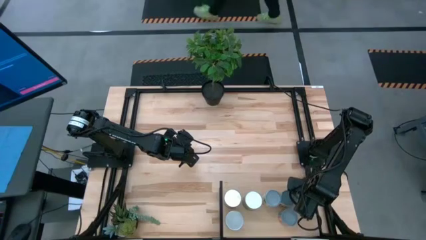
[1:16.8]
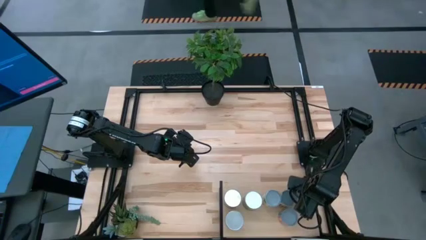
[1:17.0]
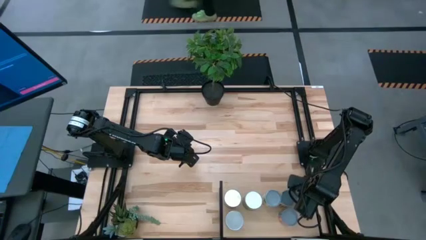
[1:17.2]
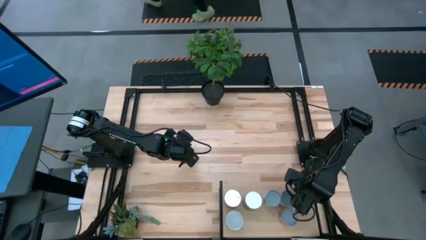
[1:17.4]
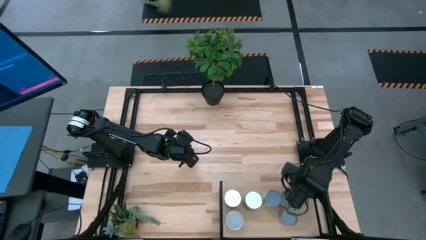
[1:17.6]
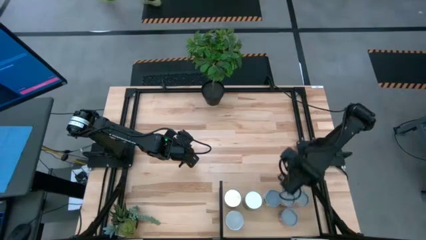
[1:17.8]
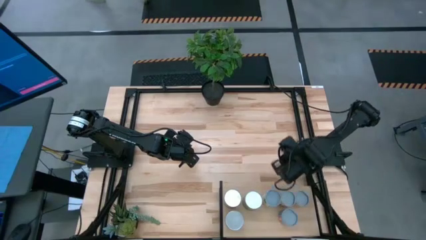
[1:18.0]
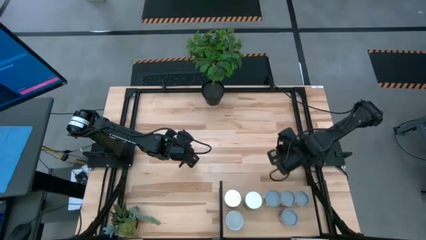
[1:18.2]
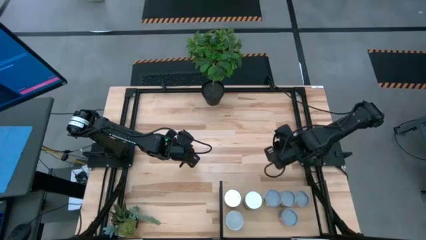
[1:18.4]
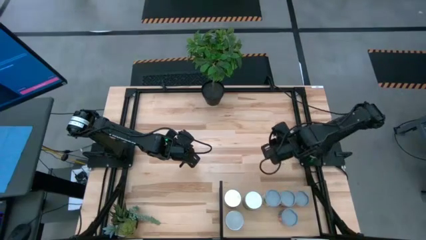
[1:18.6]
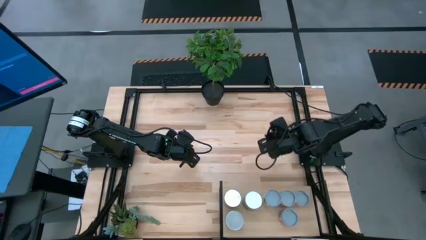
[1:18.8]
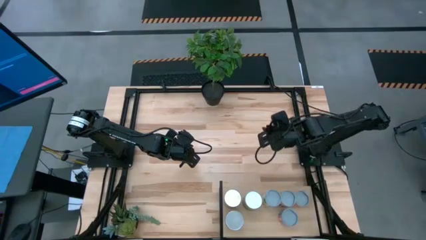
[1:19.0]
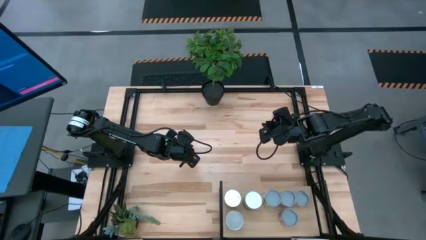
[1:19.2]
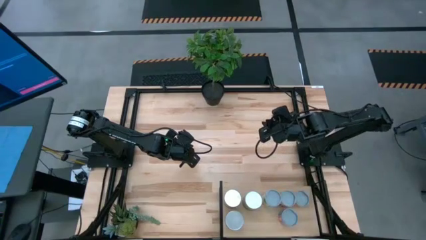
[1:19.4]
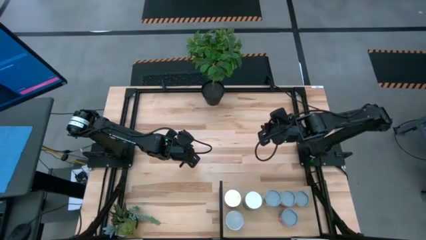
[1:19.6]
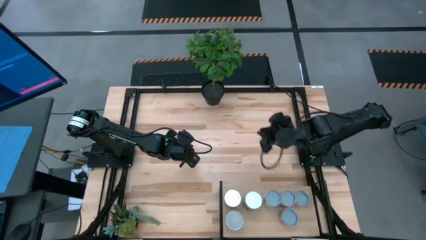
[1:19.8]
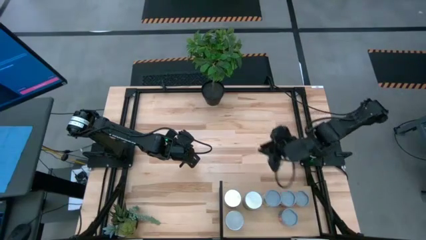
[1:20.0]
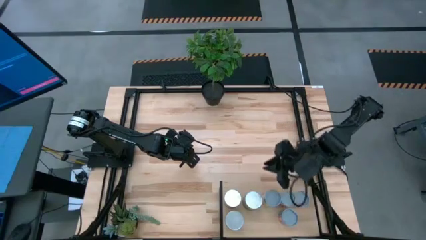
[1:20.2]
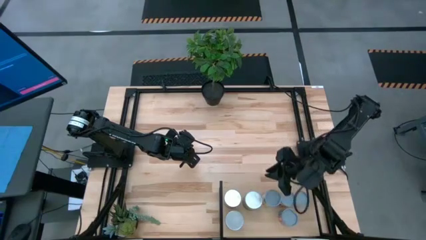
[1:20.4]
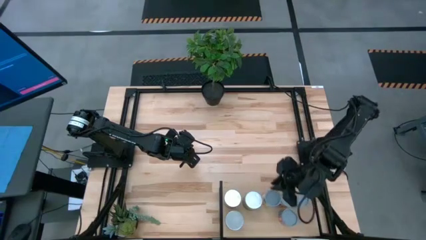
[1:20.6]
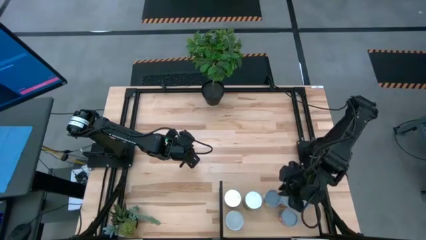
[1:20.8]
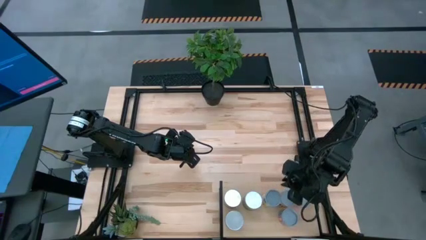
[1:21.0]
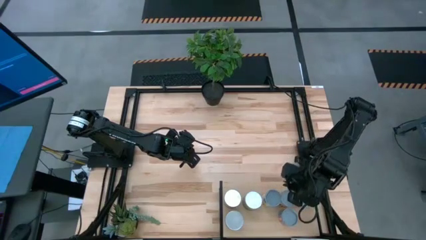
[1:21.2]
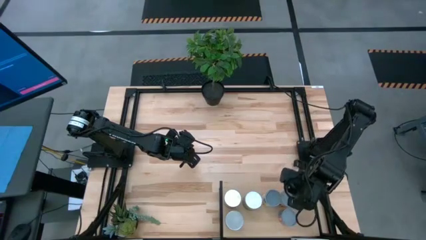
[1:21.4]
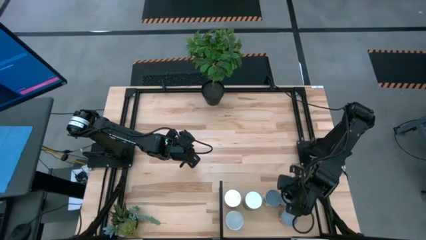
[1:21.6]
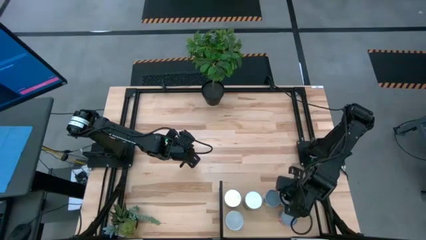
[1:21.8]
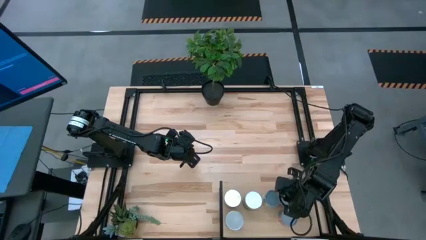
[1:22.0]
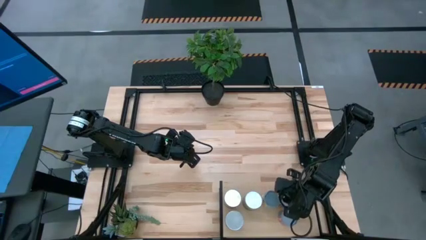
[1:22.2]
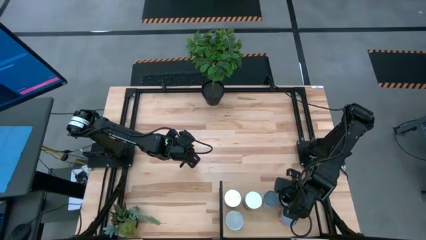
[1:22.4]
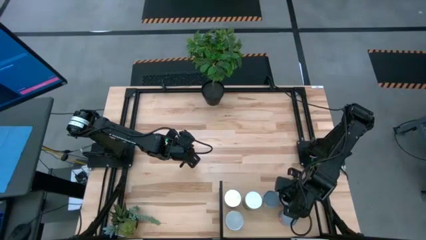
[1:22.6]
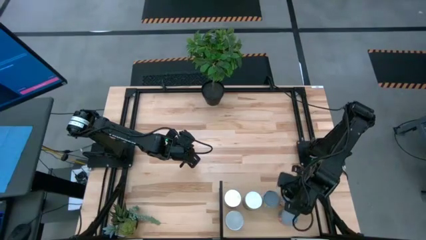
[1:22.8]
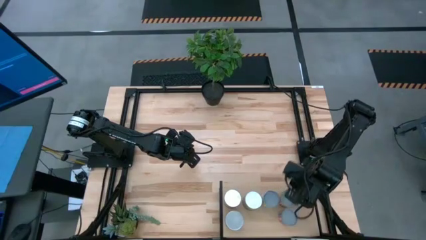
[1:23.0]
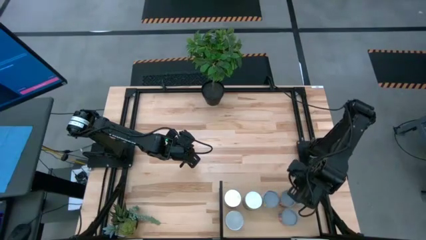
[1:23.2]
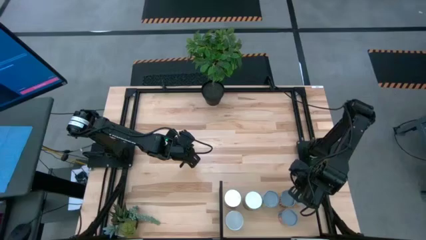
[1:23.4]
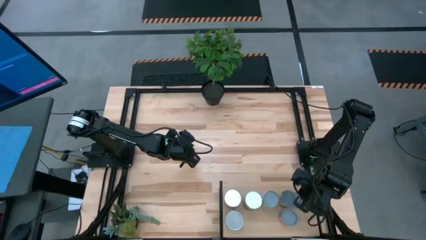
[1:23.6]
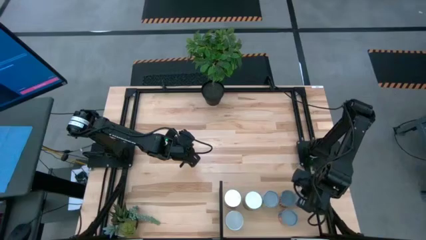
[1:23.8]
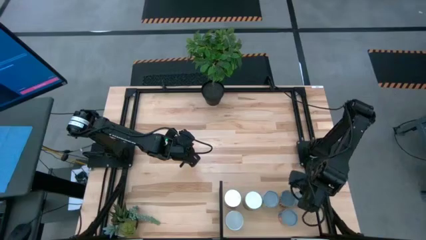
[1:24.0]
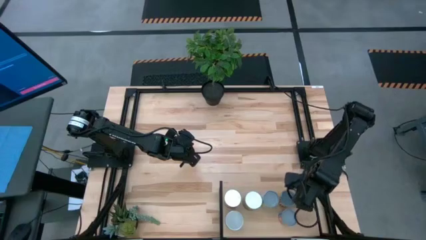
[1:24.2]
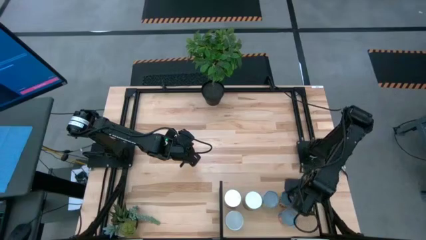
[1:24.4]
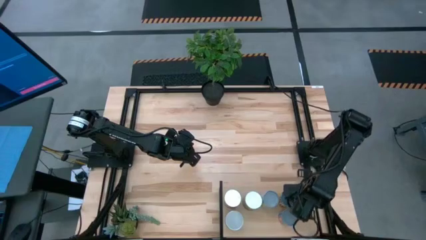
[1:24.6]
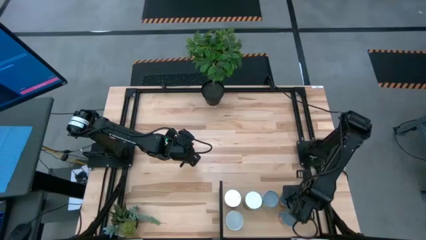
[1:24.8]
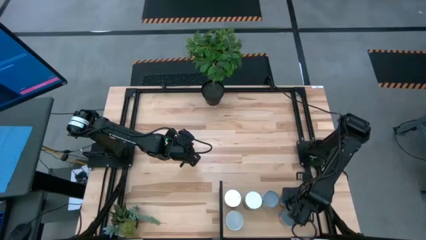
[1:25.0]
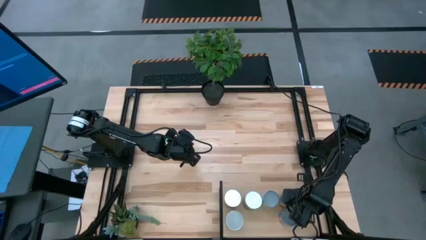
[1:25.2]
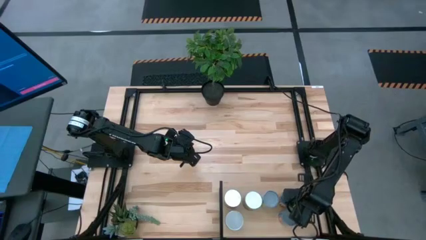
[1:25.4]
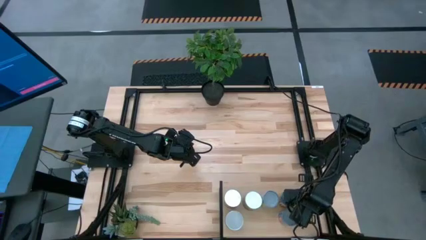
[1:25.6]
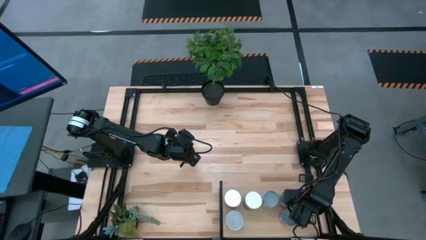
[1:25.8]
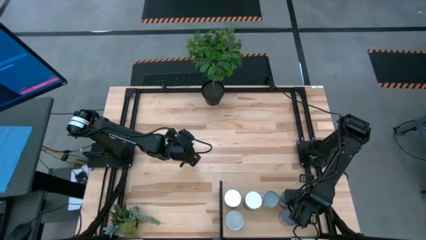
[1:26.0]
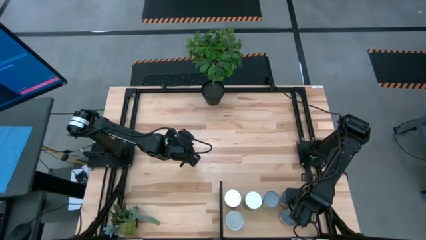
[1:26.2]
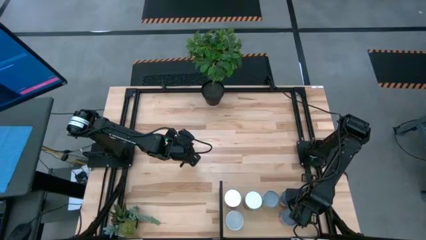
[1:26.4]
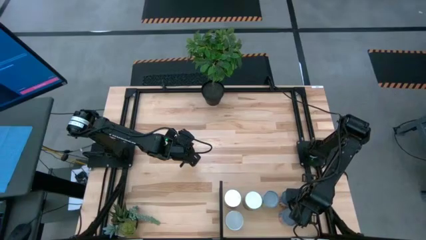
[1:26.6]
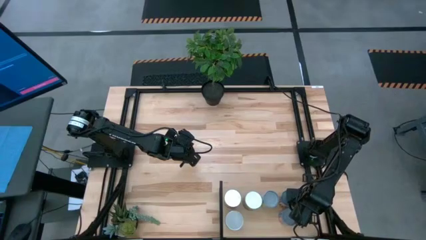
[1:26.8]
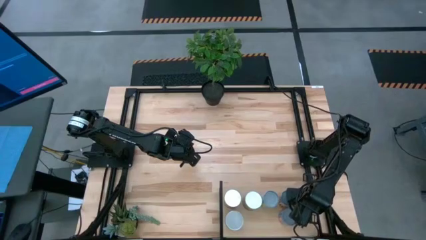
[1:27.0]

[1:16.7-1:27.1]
Task: Pick and place cans onto a shelf
Adjust the cans on the shelf

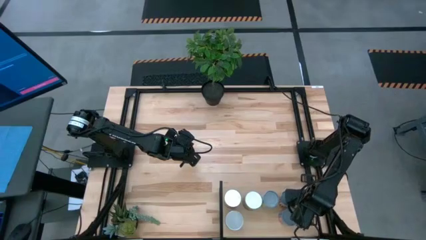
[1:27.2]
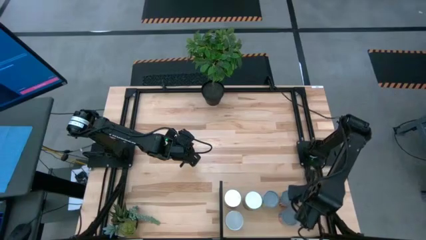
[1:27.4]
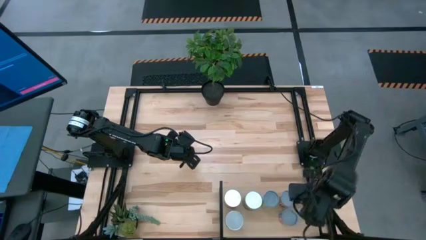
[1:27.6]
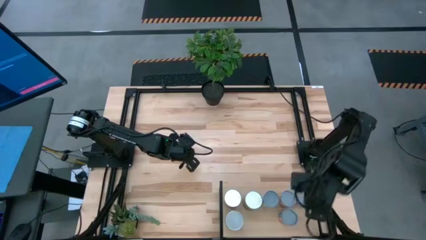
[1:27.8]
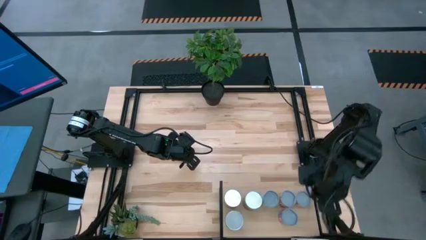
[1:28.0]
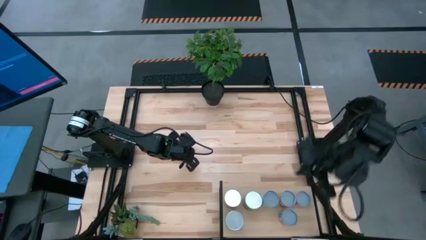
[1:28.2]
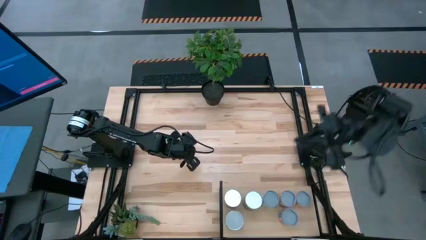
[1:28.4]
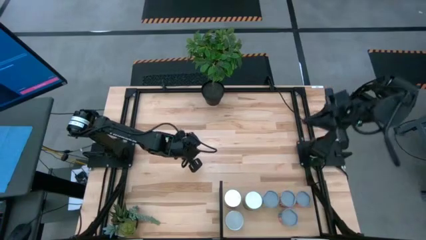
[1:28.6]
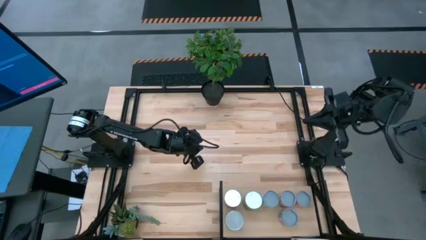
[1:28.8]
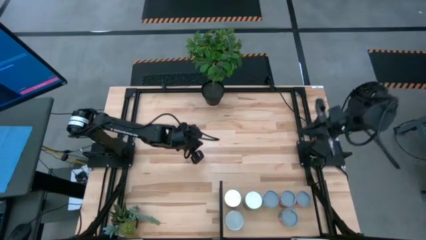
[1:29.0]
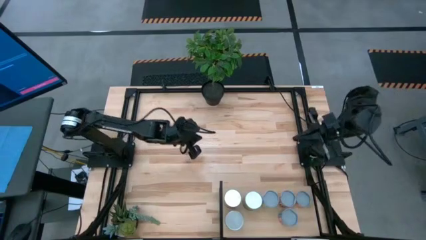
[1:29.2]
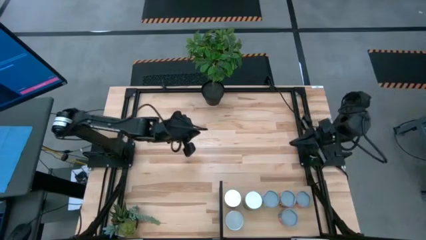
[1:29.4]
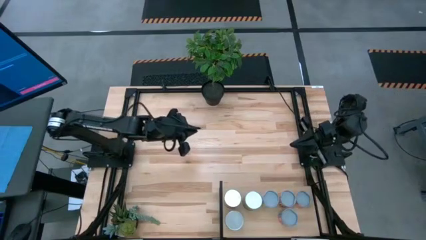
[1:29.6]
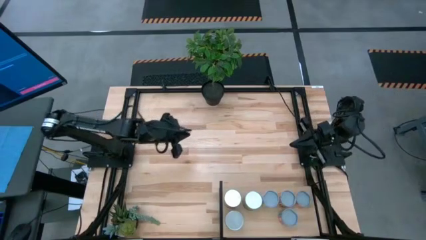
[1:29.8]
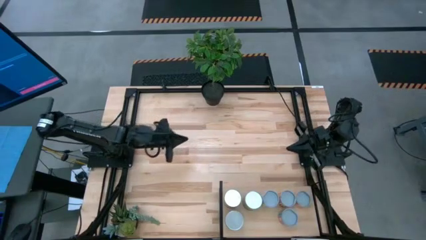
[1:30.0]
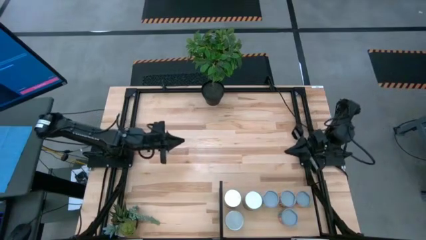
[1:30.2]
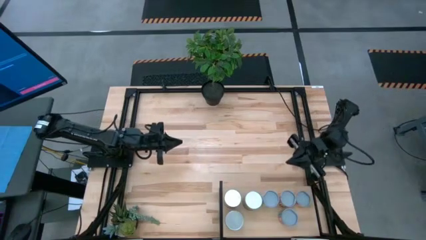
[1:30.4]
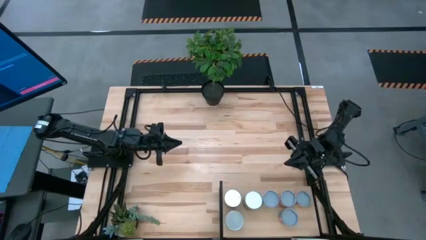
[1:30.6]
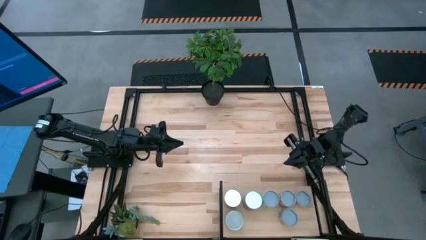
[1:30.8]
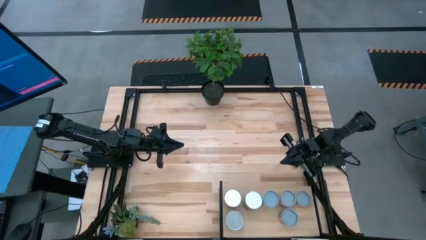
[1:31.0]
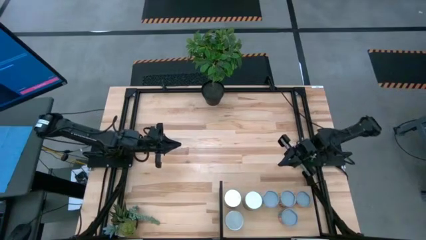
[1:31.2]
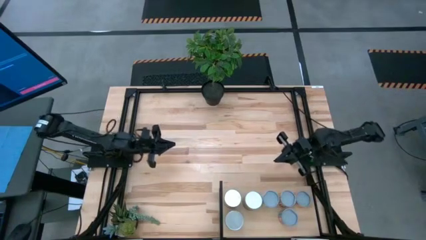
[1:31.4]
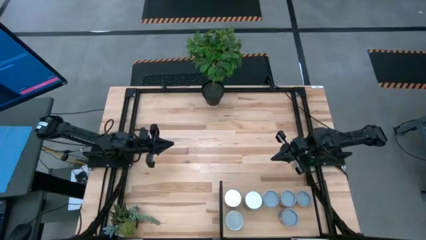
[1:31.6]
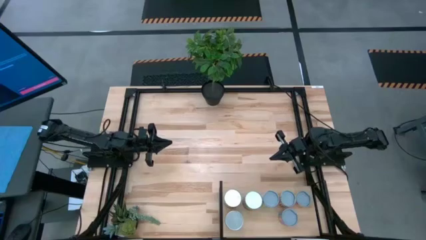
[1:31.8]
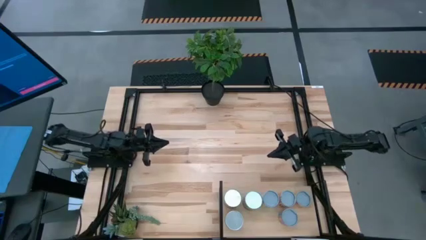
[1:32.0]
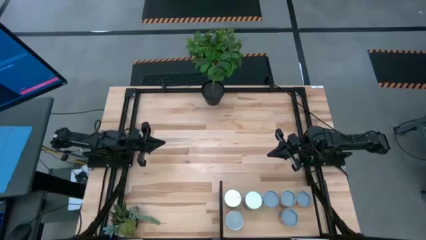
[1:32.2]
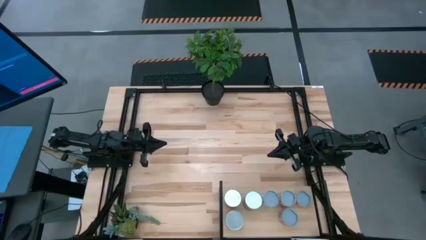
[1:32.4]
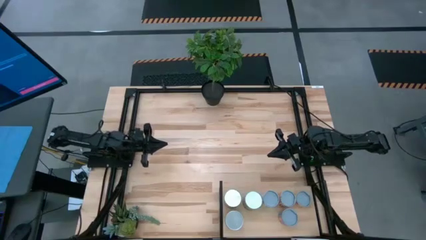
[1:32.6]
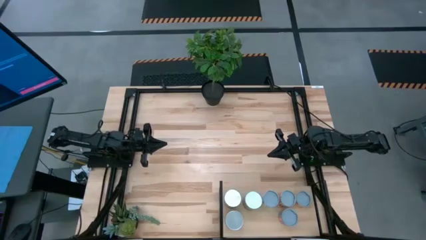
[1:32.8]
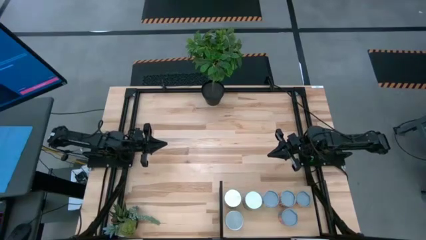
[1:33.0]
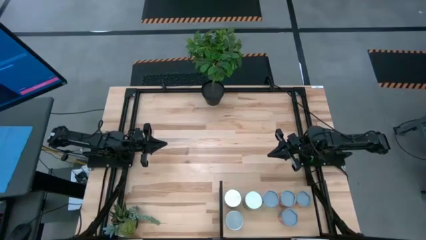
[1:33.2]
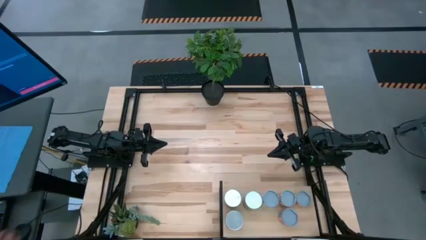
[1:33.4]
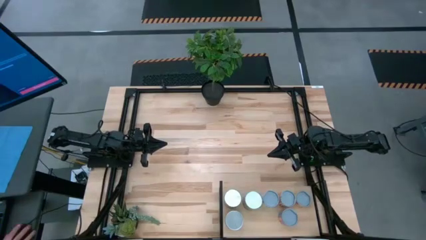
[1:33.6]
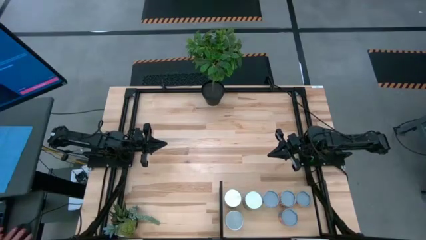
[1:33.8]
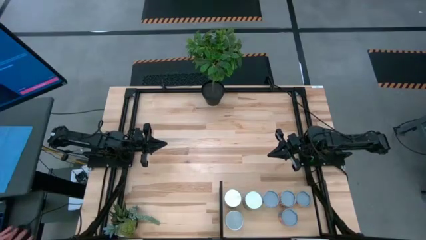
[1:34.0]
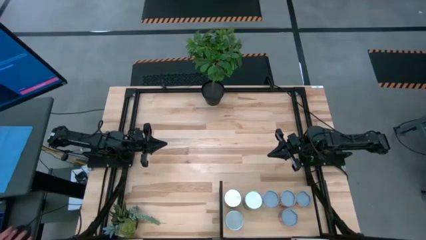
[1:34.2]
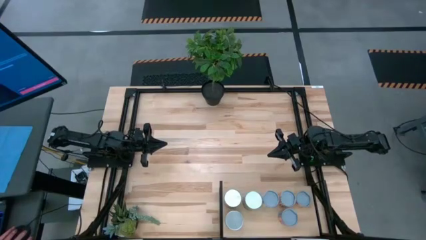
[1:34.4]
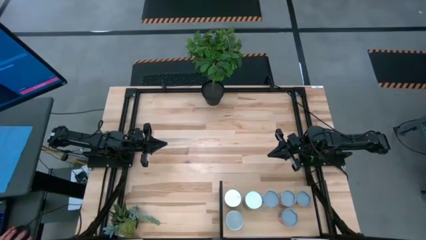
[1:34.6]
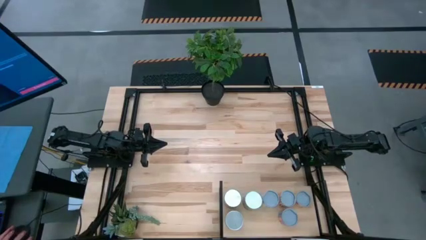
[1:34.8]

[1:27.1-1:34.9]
Return to Home Position
